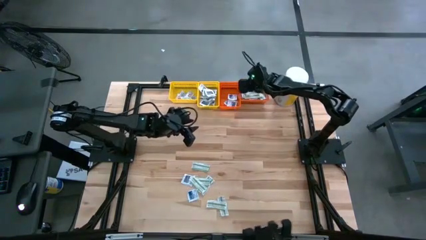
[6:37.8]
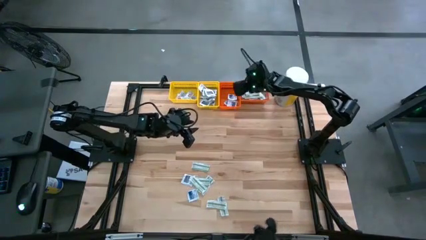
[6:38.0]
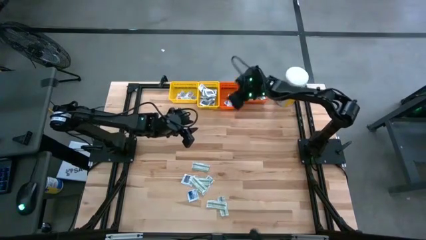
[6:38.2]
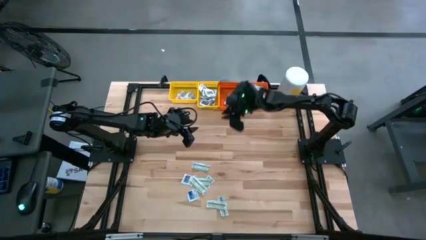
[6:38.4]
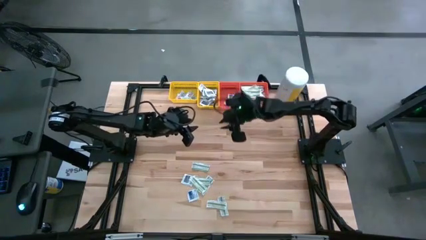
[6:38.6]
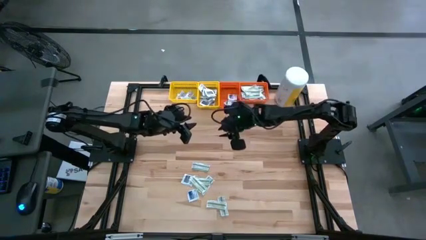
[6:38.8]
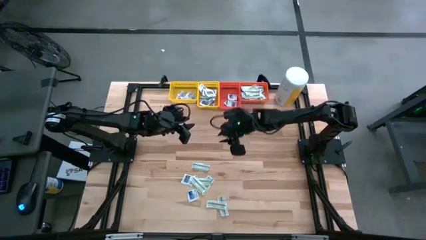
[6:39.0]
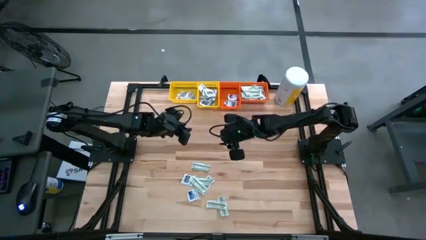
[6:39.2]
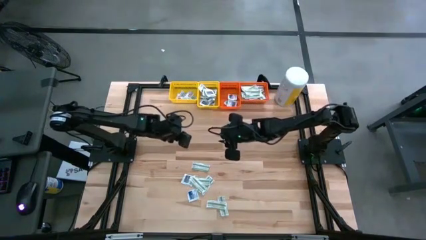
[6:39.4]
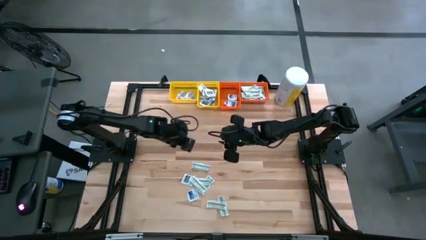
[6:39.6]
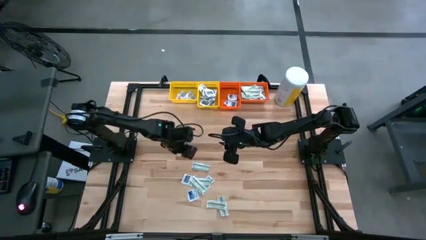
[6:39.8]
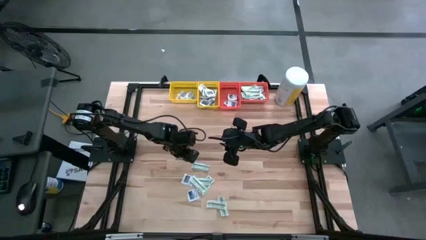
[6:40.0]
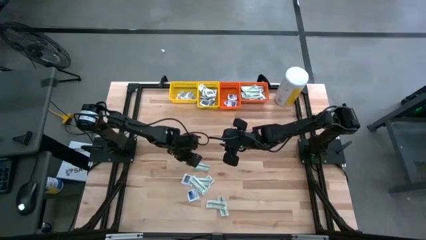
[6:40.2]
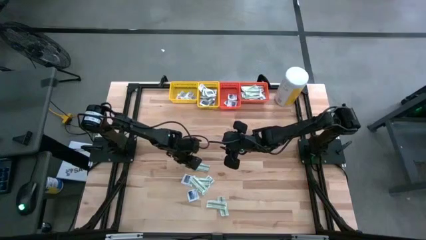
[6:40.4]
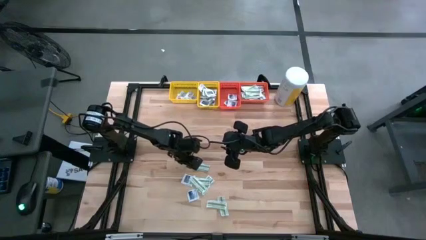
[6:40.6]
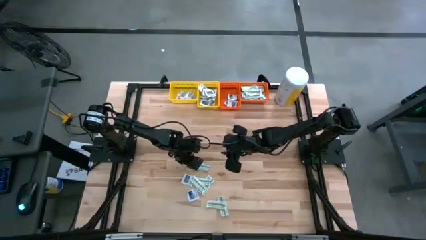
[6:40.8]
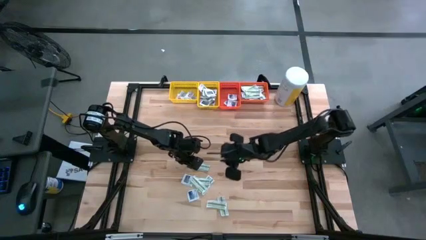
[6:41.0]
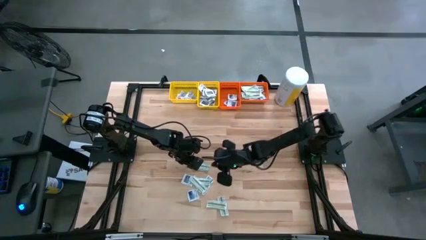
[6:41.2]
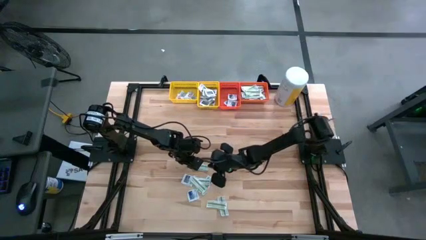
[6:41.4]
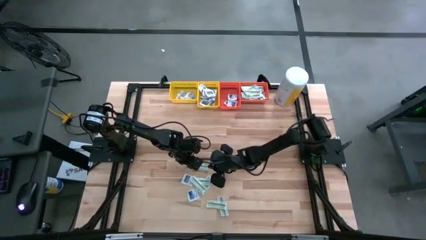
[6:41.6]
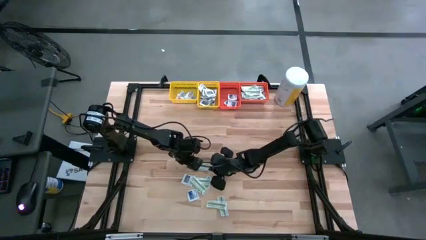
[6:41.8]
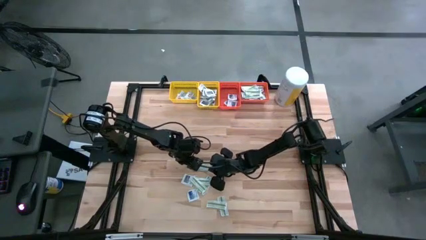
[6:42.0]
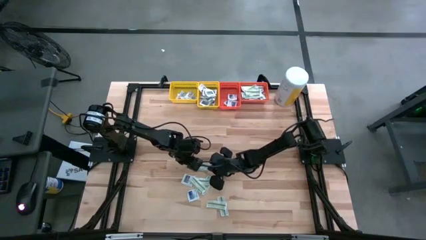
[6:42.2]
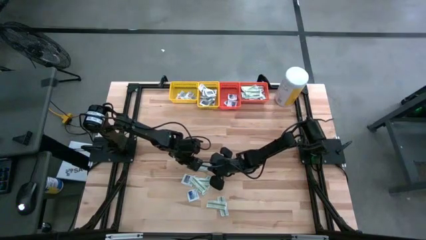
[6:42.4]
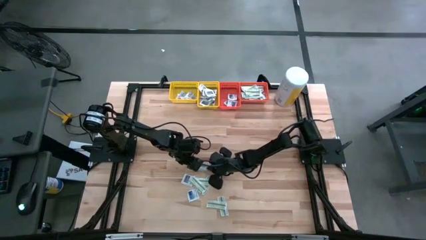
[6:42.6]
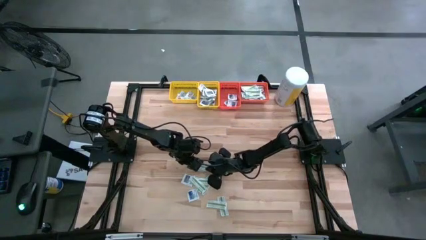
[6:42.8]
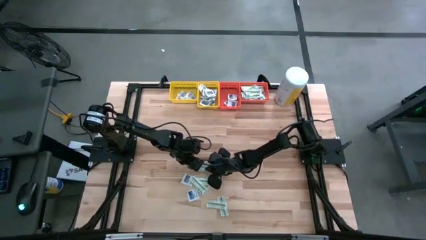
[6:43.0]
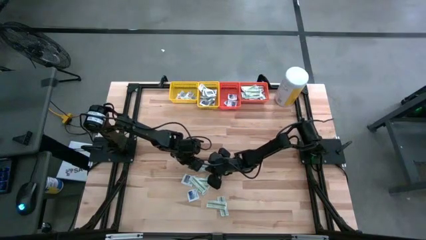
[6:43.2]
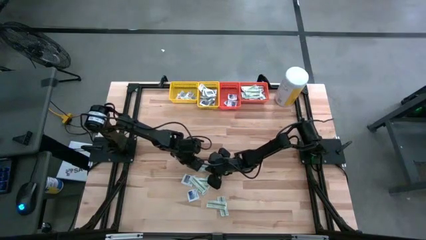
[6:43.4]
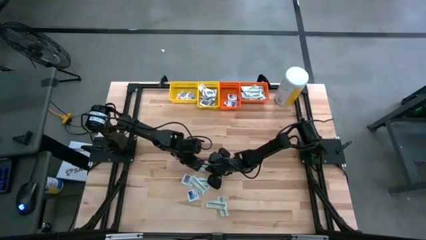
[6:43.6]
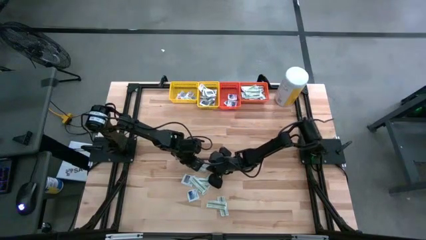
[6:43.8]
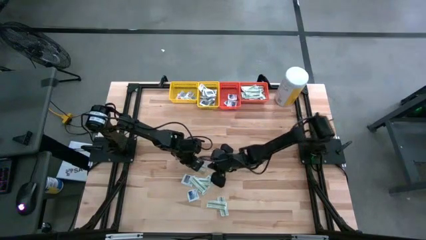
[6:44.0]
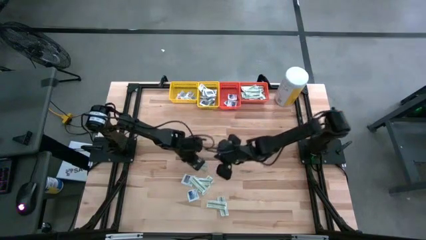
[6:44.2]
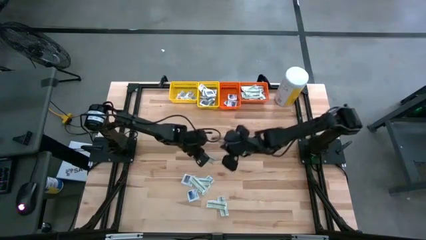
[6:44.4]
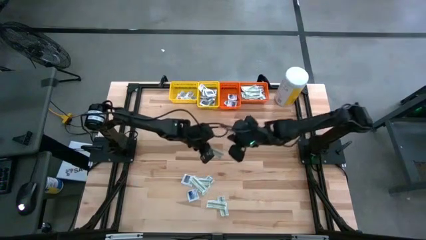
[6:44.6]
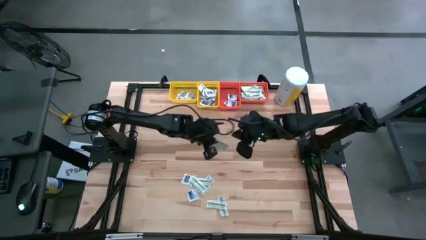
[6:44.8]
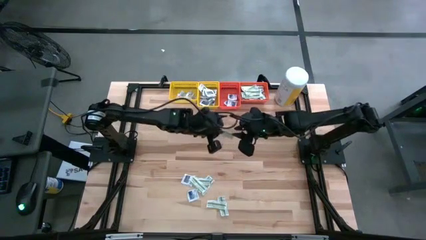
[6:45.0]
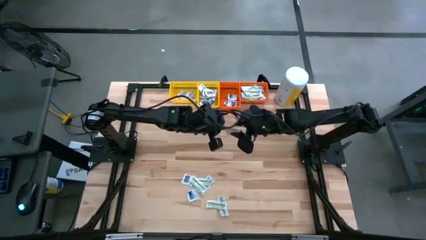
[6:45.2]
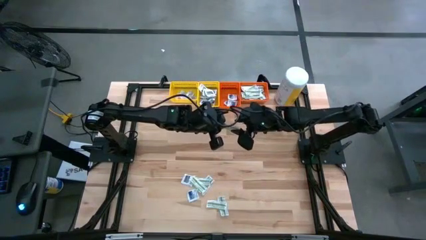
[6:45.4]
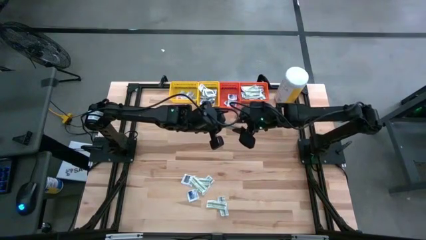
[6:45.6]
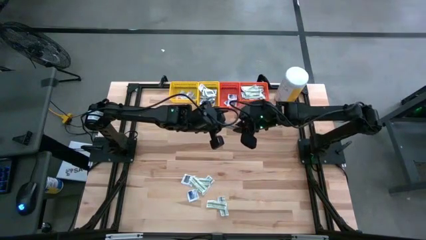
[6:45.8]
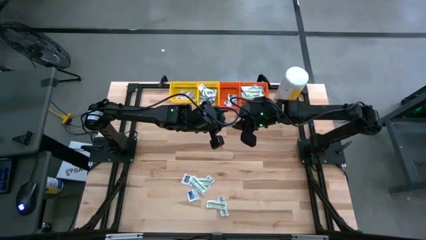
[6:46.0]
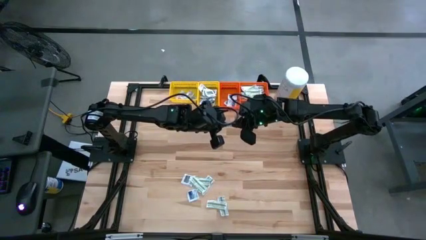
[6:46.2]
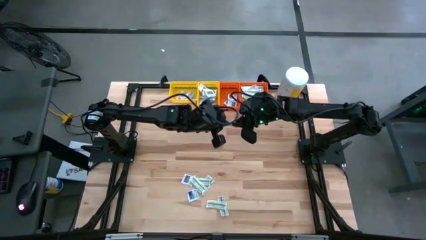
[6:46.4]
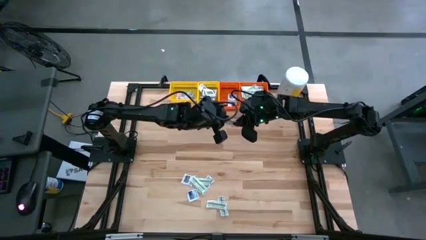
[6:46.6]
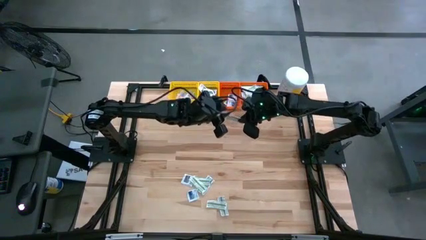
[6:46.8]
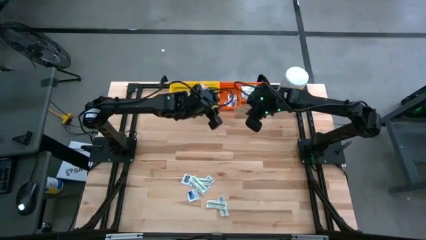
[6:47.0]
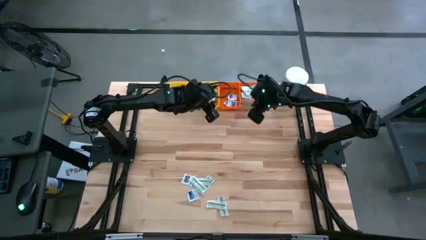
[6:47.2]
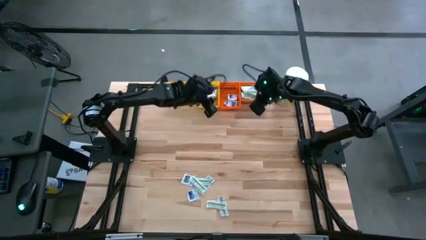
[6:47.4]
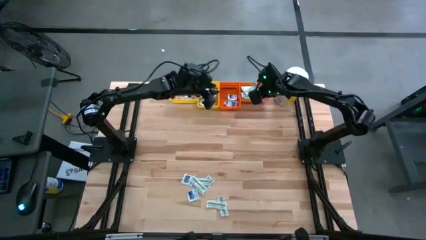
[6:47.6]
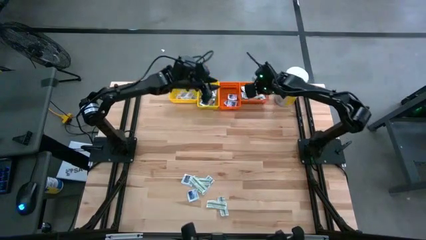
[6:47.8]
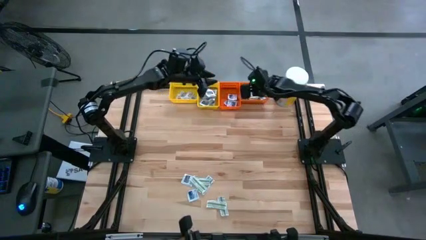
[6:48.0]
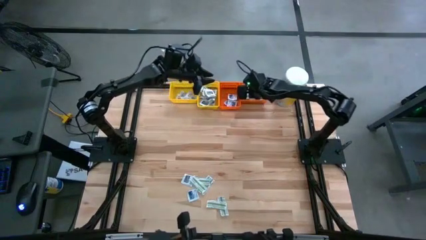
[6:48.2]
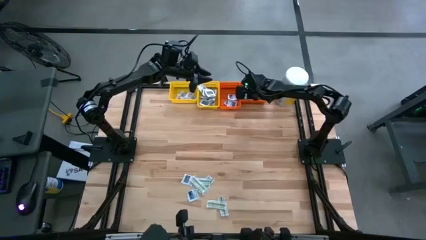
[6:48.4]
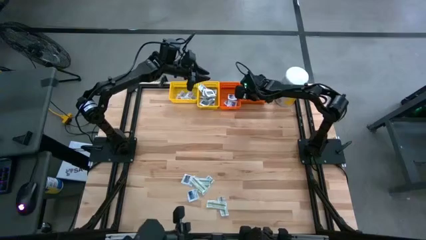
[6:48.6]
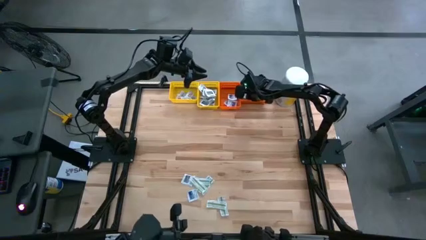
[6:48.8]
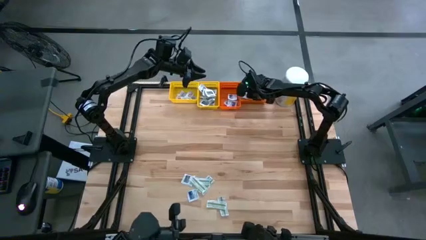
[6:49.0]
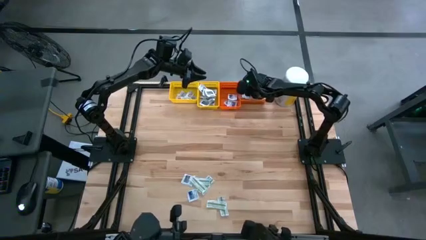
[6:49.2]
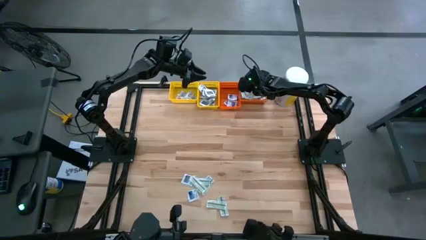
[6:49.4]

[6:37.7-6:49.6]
Task: Pick & Place First Aid Supplies
Put the green pad into the right orange bin

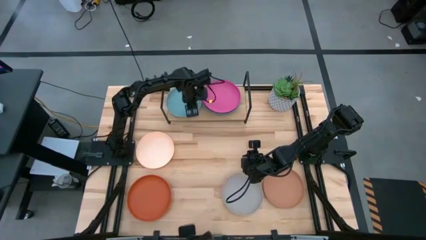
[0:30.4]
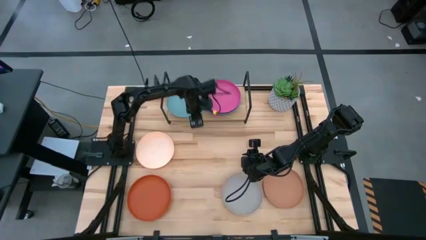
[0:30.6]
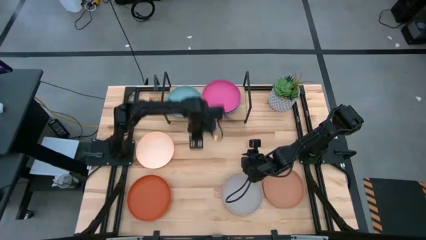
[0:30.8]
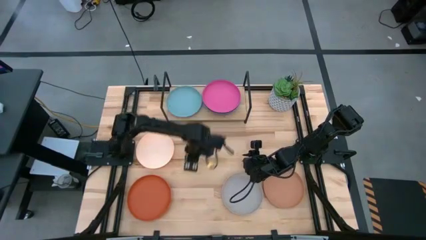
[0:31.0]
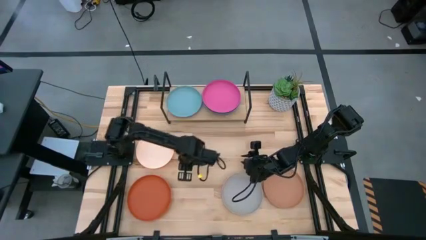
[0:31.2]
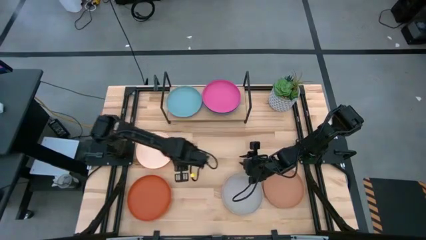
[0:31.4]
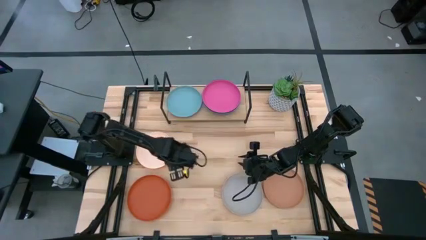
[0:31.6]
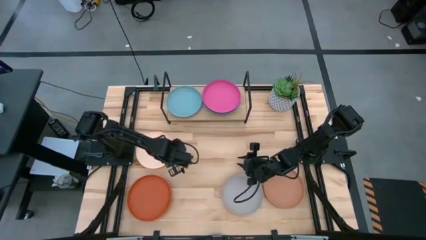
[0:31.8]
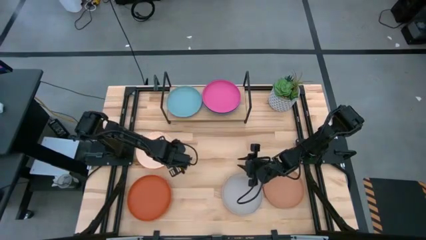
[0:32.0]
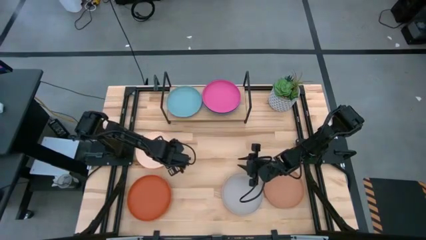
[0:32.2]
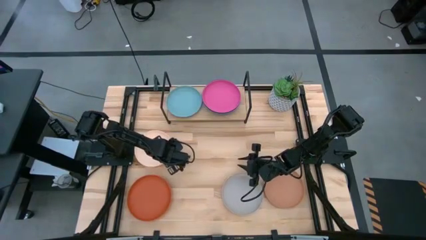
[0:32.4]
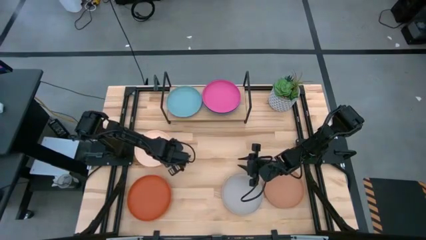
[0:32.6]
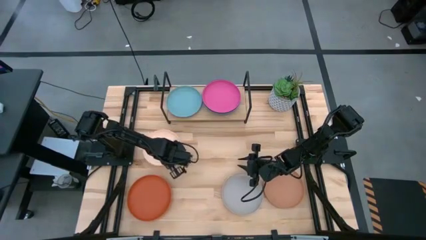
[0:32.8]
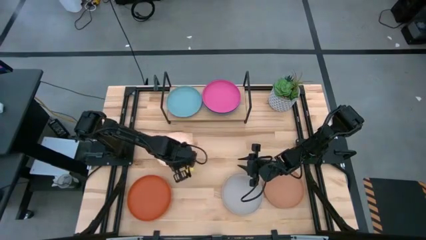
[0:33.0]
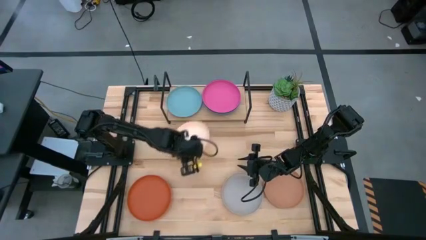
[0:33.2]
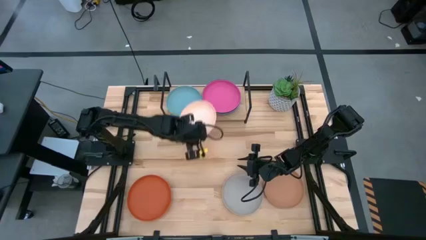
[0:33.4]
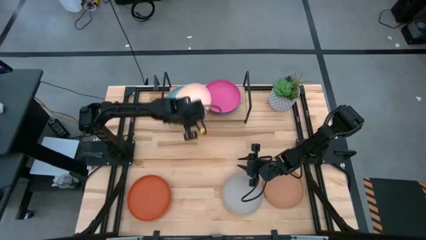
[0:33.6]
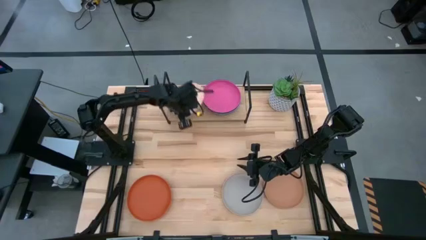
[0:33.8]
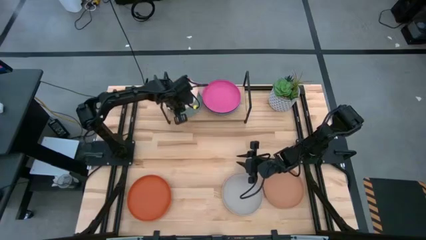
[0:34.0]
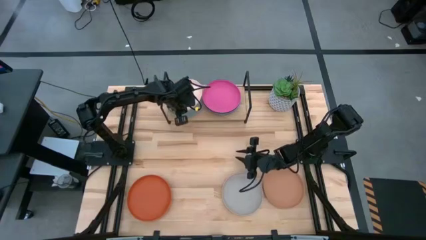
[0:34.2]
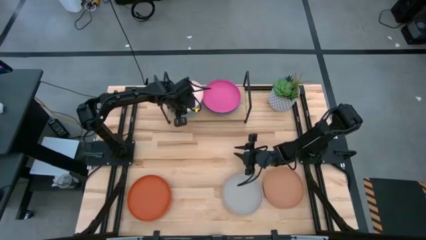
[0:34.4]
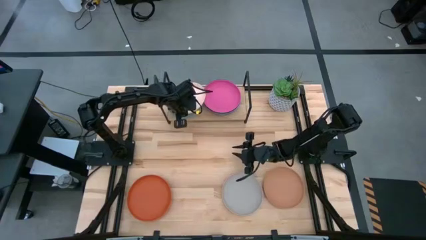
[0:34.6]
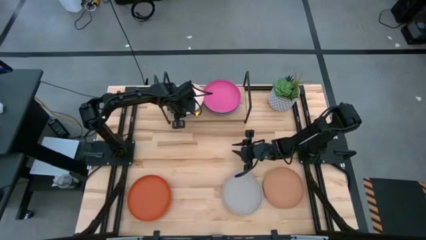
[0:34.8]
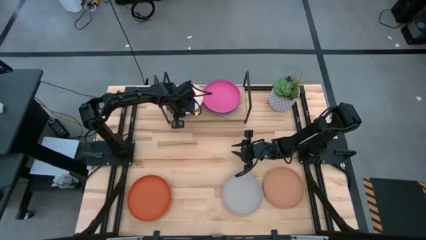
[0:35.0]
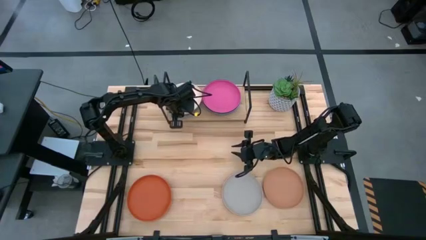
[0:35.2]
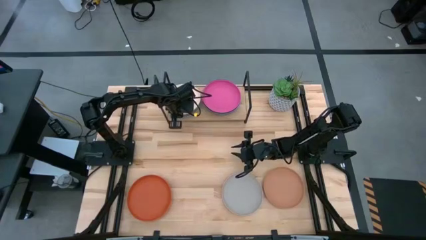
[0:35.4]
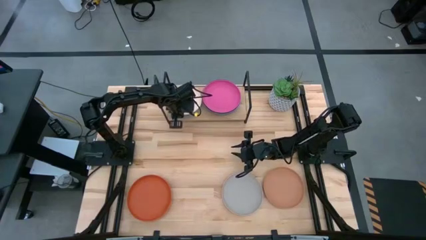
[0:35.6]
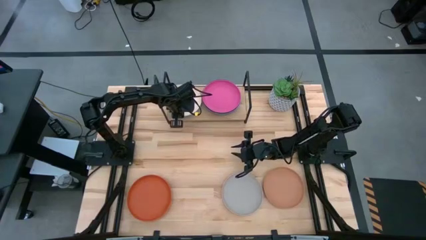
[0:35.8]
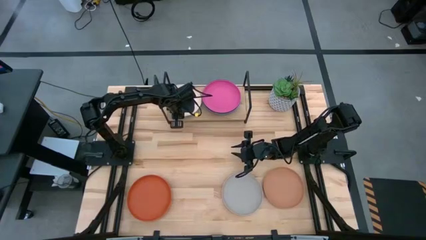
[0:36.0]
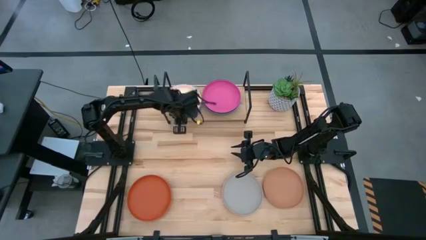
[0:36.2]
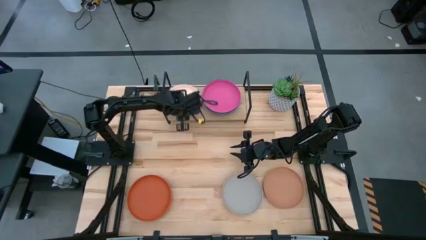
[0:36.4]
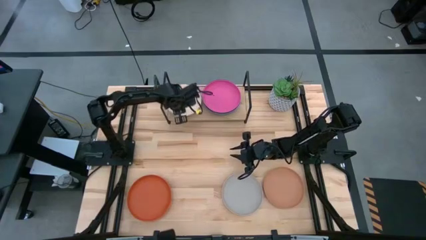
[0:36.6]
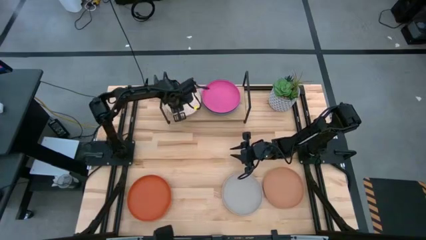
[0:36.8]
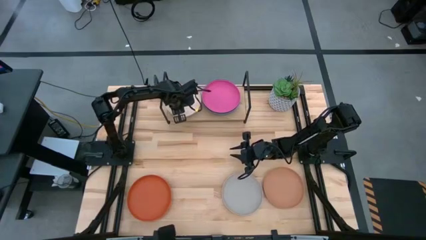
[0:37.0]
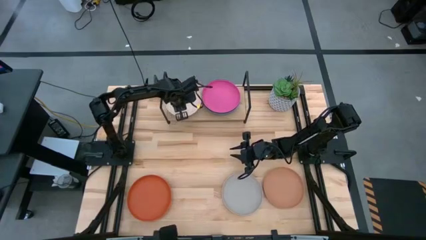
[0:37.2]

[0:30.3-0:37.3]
Task: Place and stack plates onto a shelf
Stack the peach plate on top of the light blue plate on the shelf
